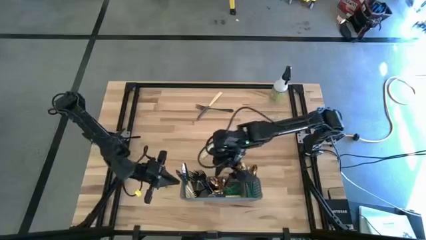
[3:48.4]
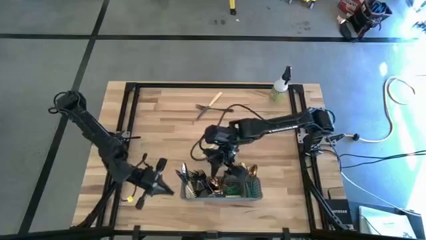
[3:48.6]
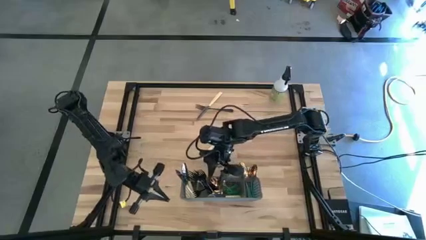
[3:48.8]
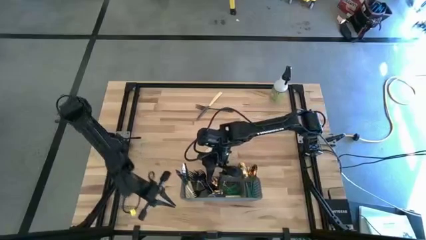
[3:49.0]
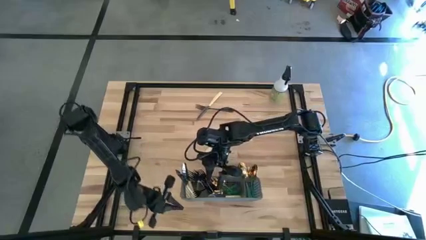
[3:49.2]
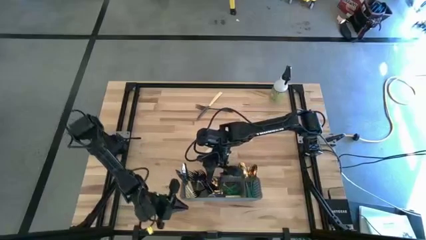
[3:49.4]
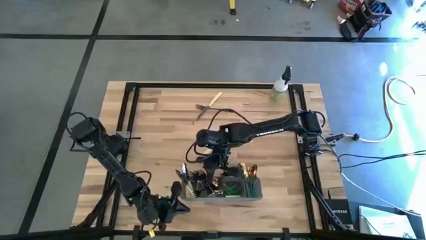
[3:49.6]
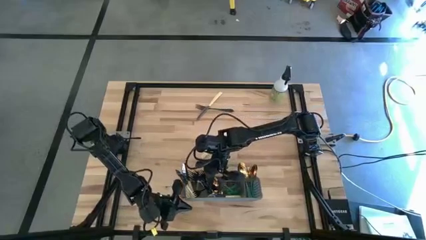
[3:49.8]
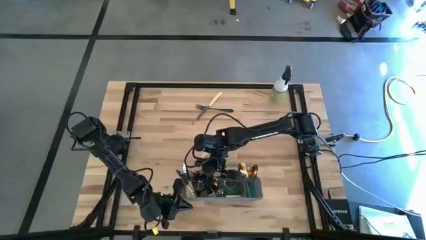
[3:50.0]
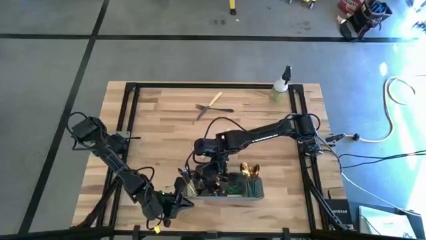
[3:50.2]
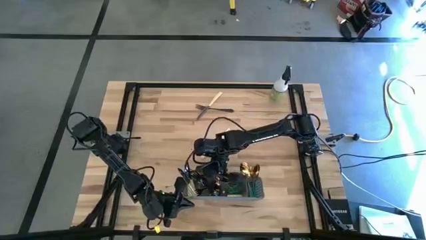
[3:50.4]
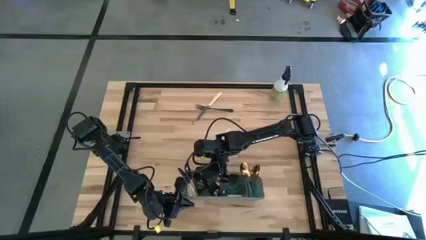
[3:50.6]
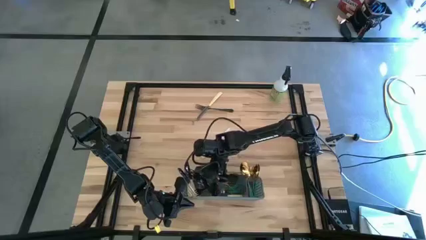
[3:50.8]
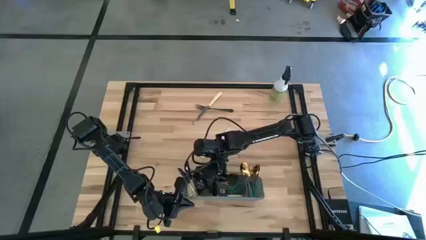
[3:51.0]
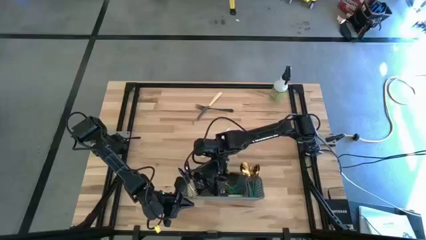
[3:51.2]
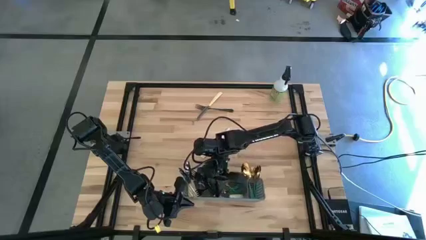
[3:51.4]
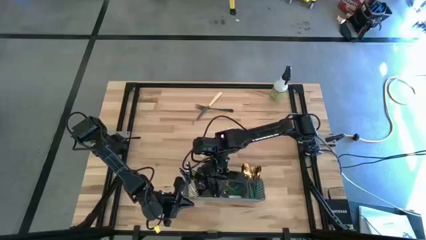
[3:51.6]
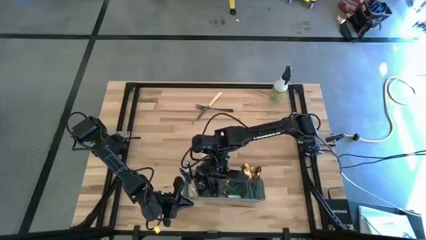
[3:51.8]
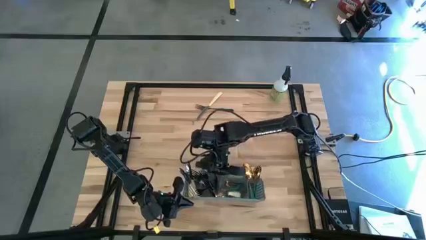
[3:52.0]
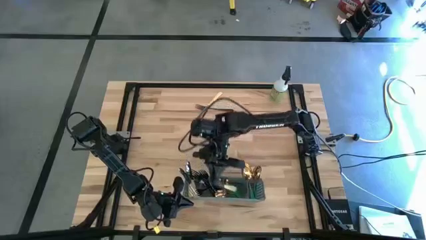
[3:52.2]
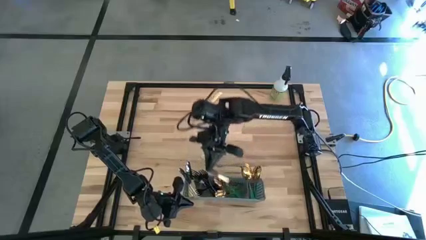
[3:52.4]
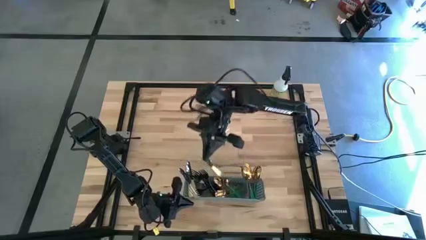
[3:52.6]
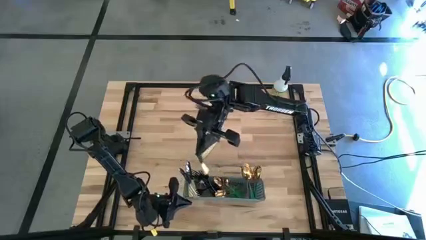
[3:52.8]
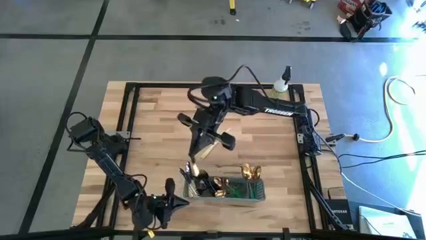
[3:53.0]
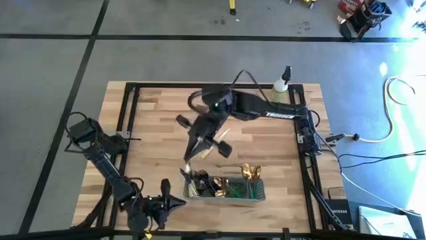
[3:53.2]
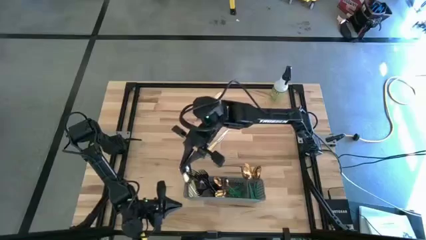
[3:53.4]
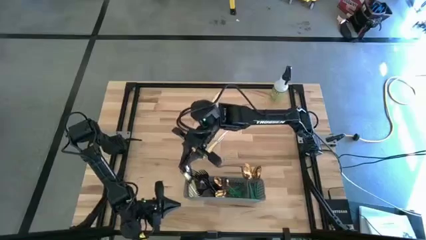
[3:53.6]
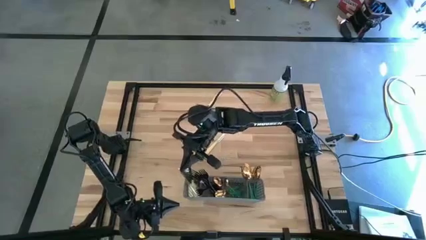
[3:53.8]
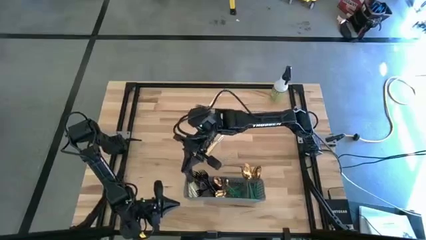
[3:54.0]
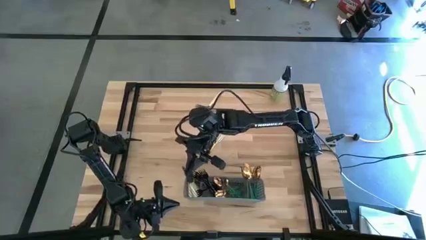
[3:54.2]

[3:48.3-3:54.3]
Task: Sort silverware
Put the left yellow knife into the gray cutlery rack

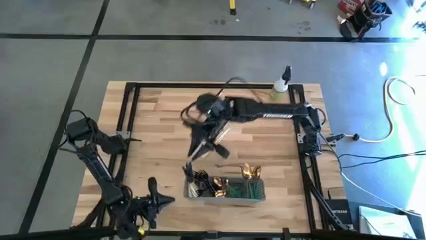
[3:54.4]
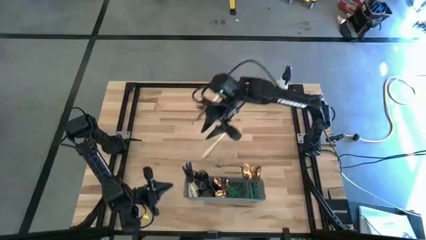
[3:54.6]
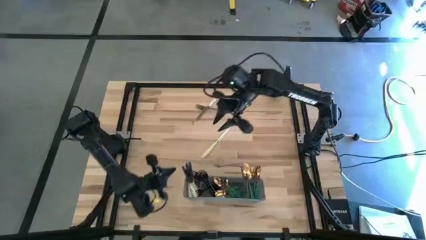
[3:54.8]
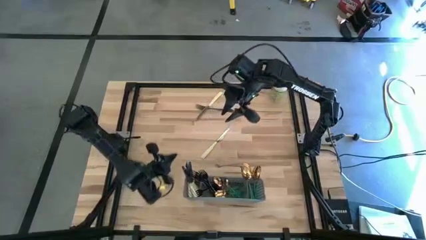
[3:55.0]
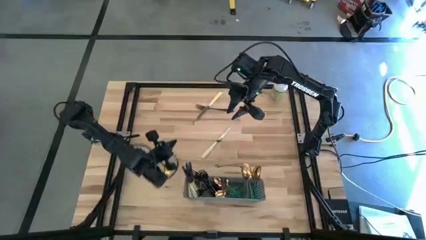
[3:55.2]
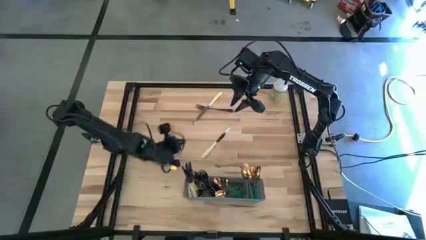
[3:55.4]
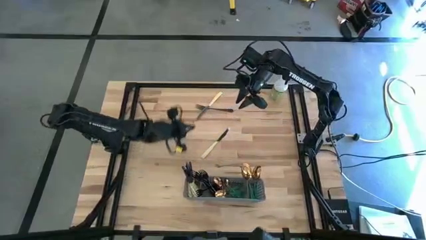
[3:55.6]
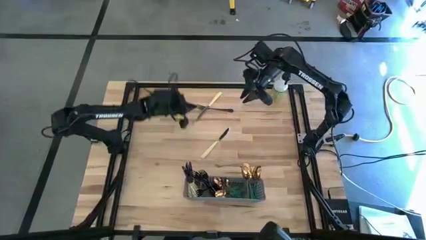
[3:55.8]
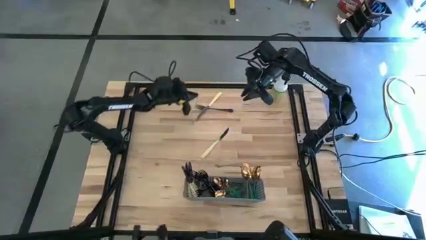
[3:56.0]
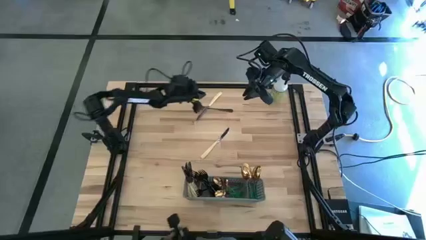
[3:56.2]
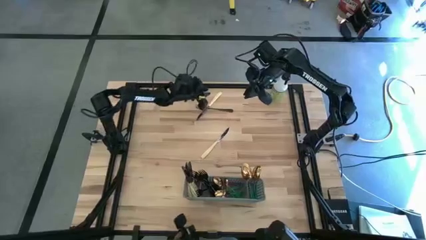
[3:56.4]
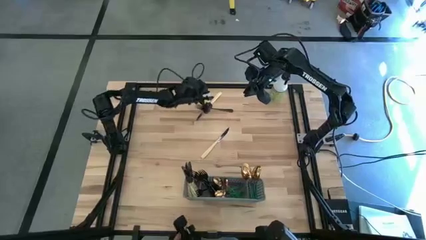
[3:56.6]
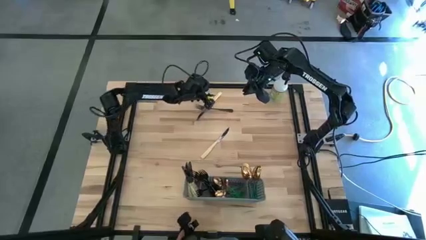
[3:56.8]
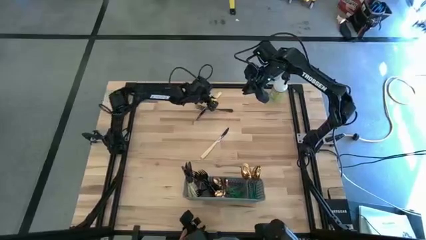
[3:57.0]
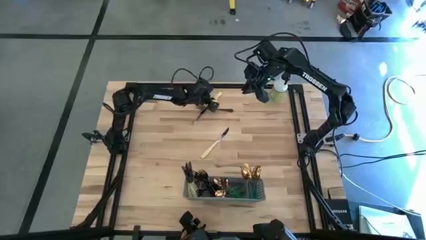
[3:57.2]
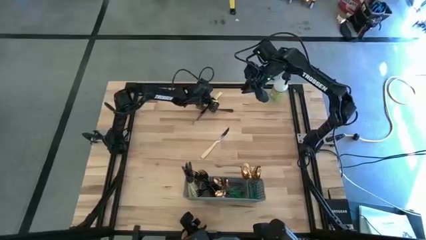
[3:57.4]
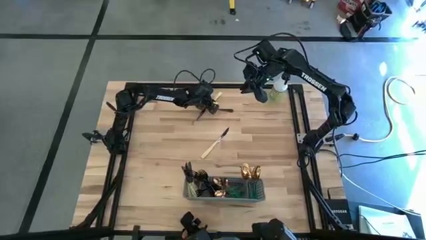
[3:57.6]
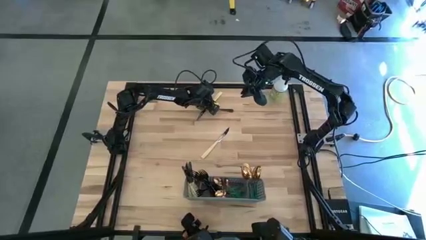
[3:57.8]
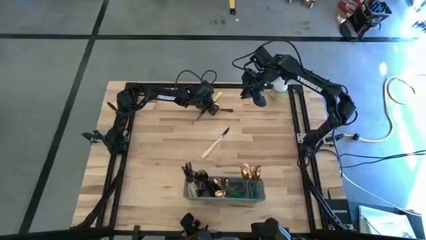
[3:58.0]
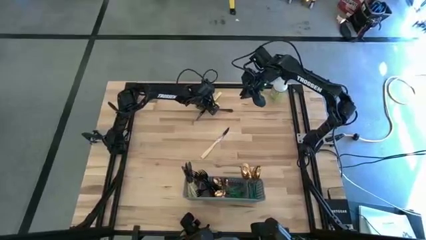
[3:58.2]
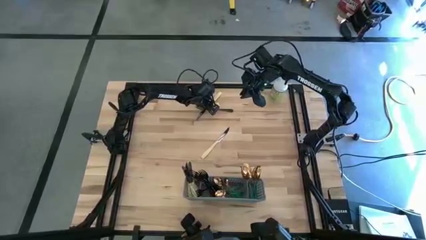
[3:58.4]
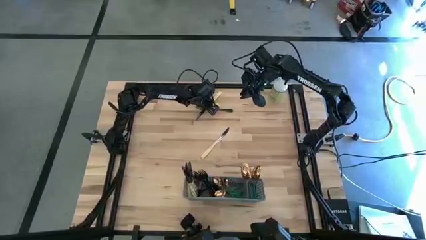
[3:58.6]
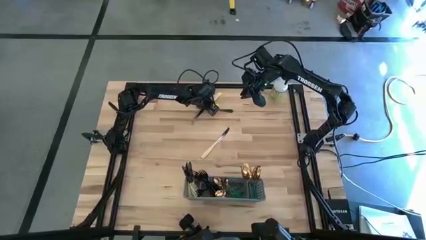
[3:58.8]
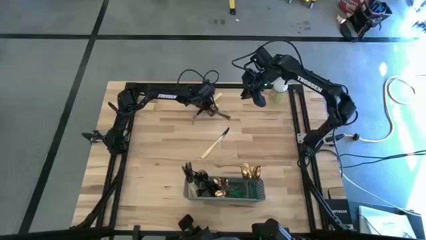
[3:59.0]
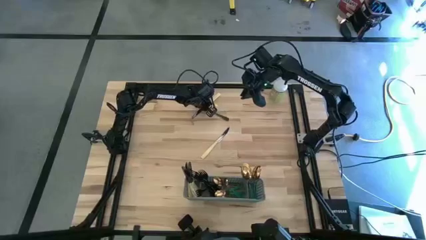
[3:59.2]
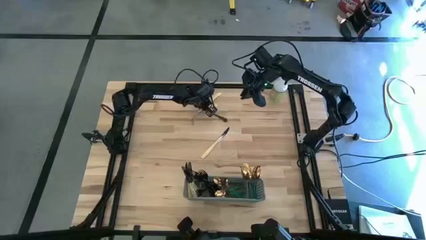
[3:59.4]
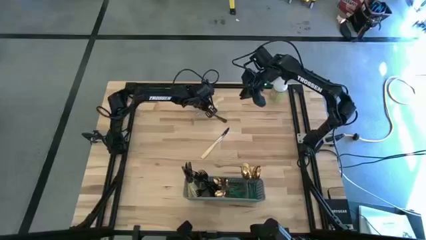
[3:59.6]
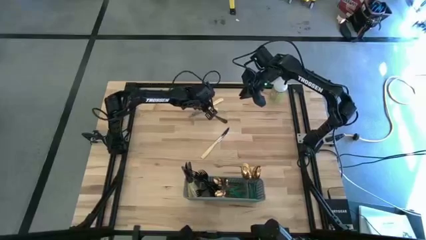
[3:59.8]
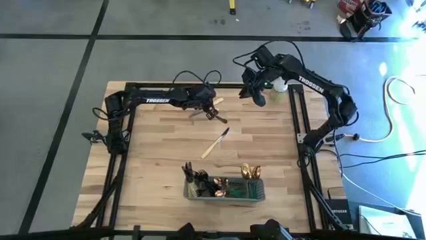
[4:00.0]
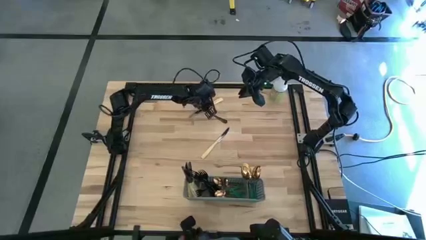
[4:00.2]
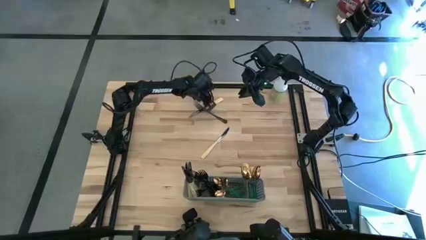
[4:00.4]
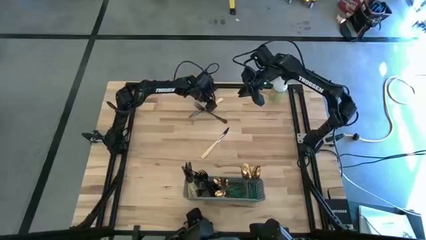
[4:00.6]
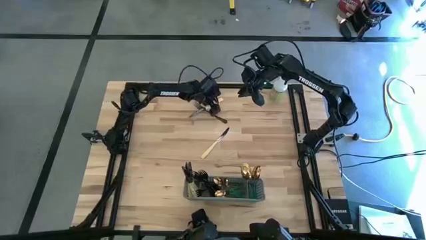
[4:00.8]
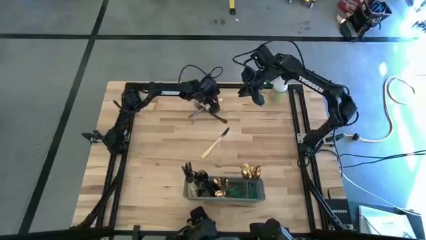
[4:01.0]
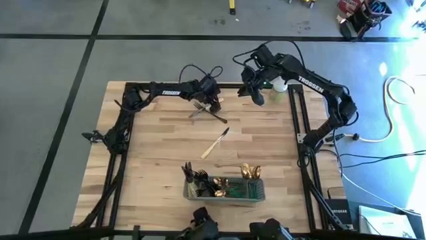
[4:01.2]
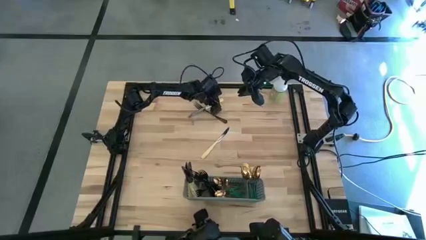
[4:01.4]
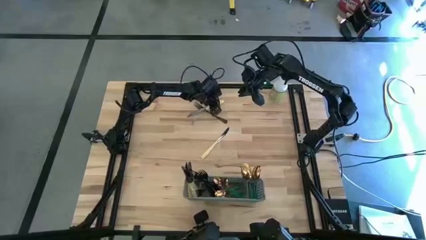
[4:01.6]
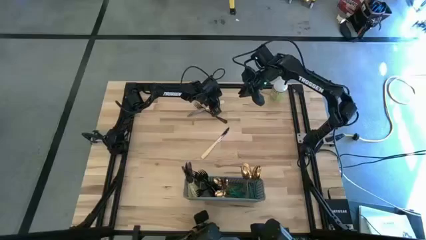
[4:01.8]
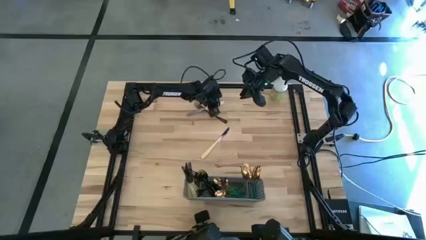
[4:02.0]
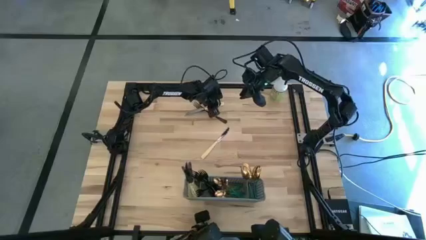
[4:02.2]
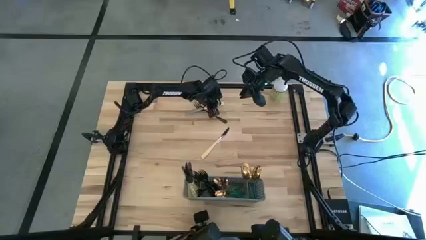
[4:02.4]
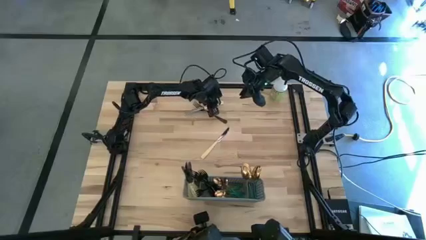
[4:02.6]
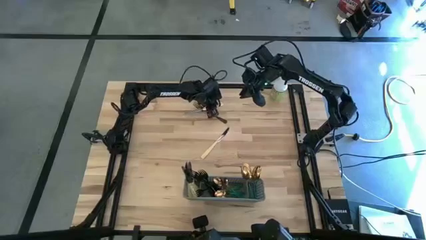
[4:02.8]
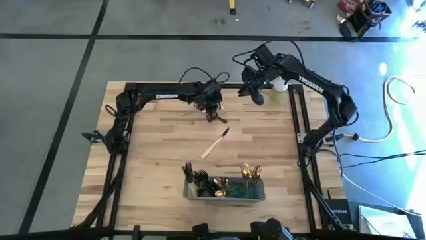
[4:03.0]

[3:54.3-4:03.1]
Put the top yellow knife into the gray cutlery rack
